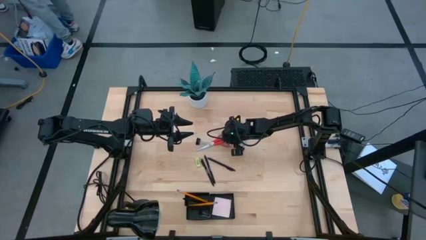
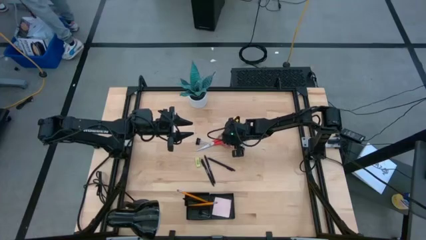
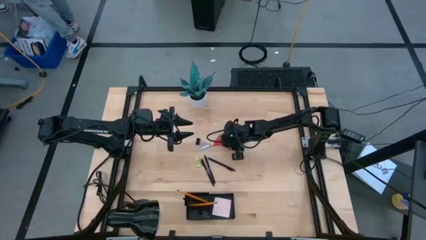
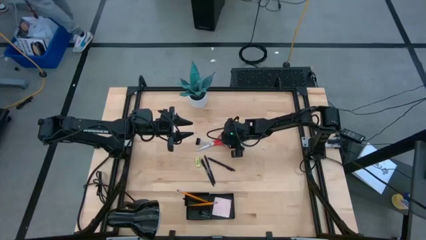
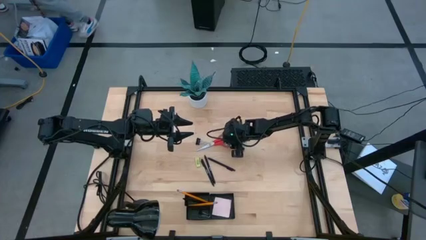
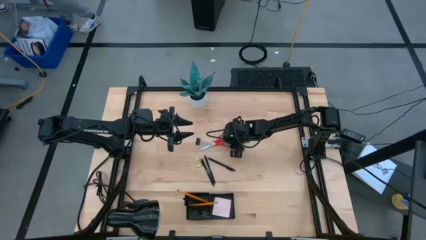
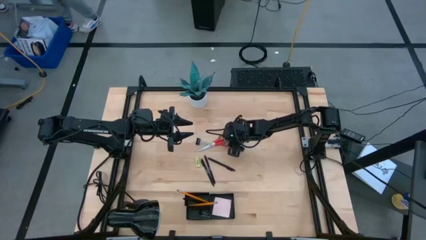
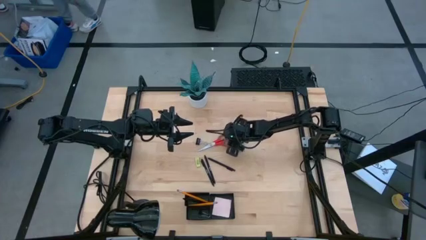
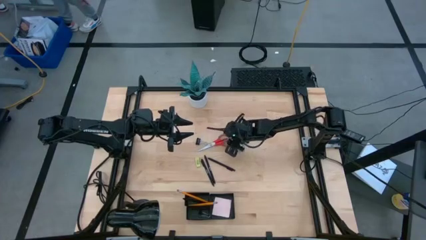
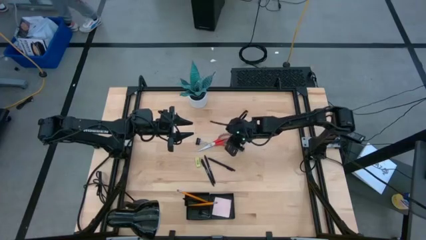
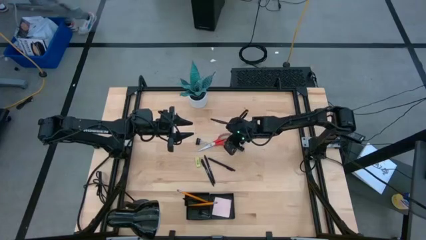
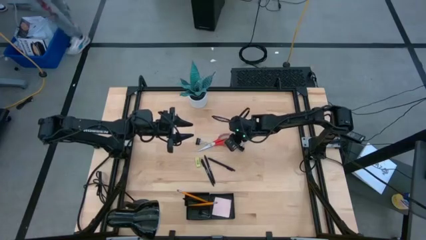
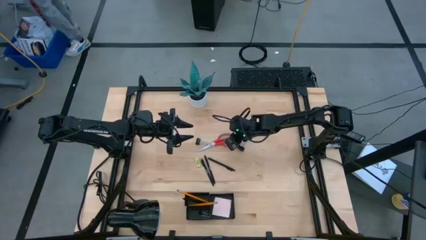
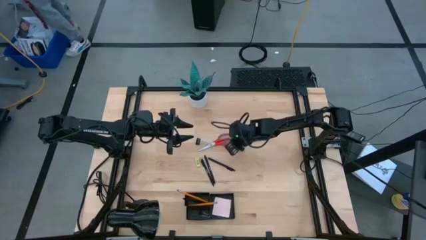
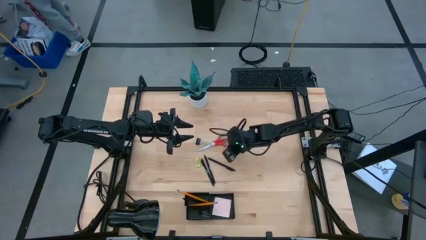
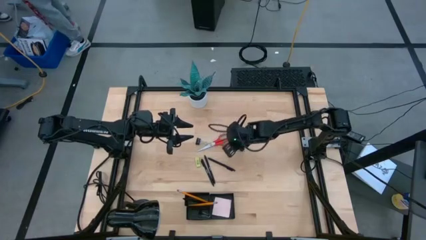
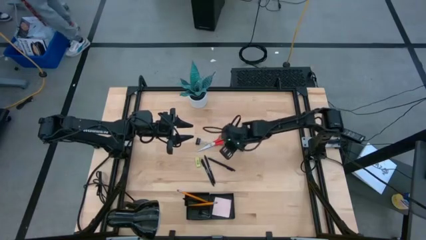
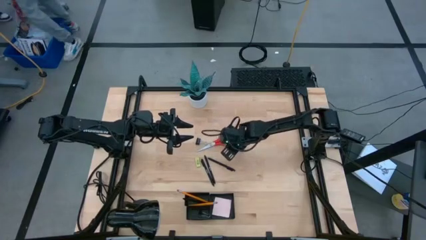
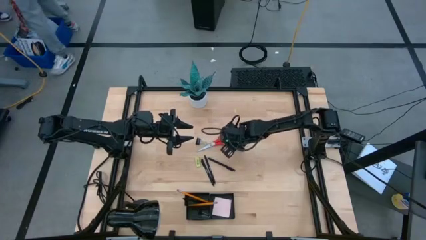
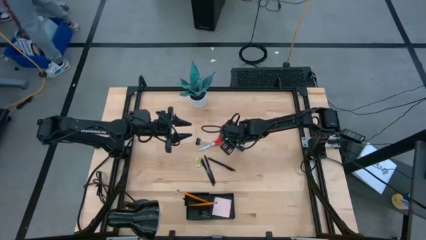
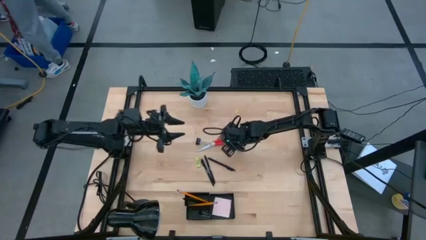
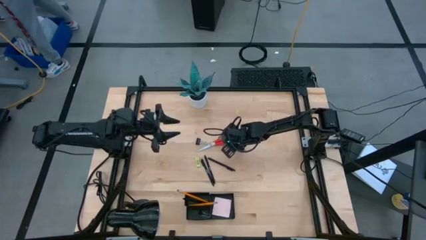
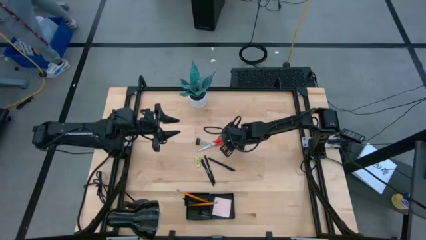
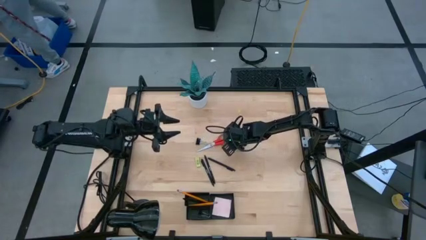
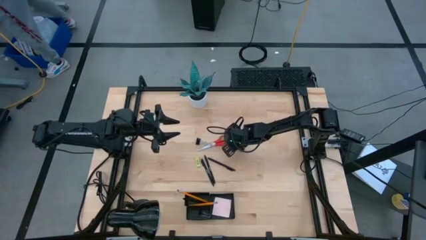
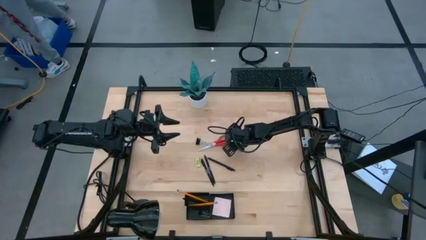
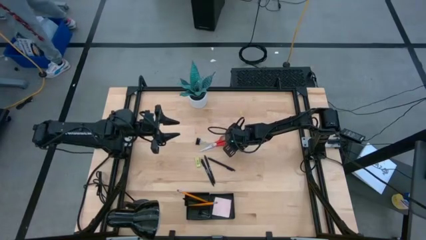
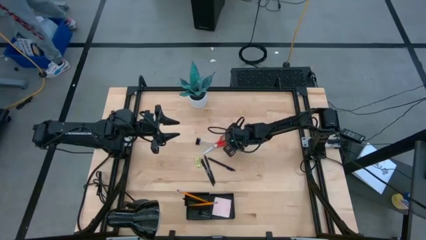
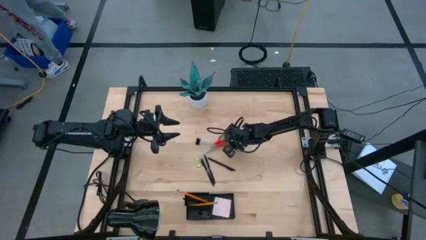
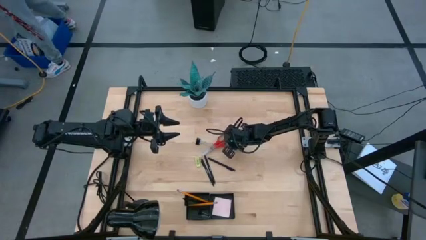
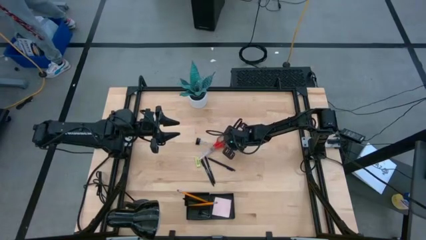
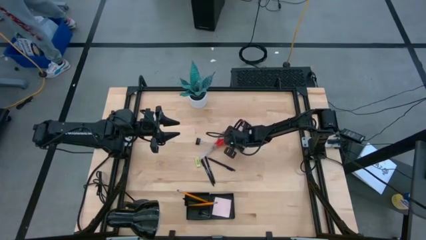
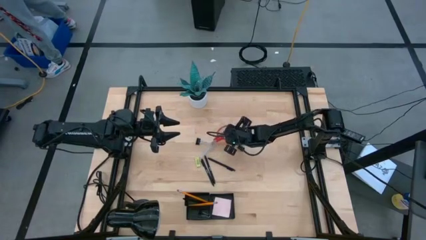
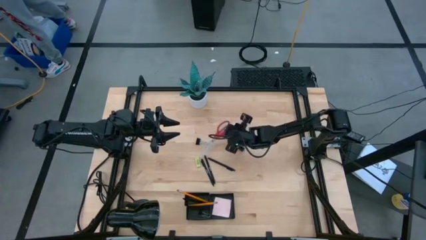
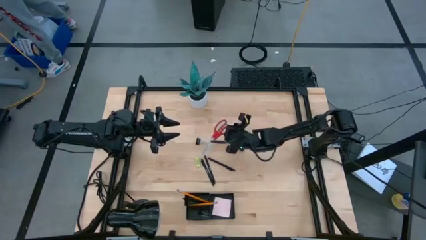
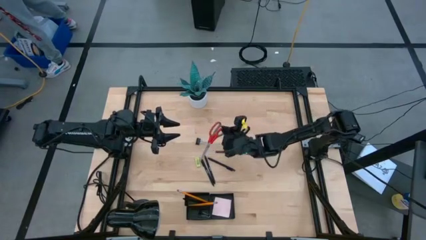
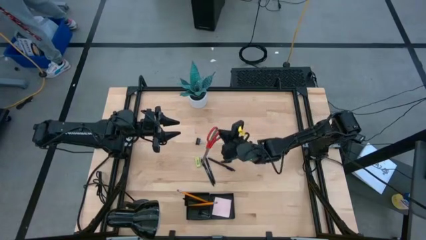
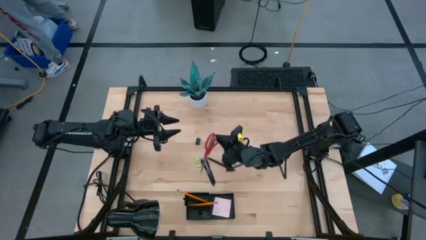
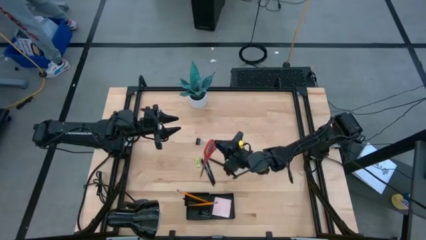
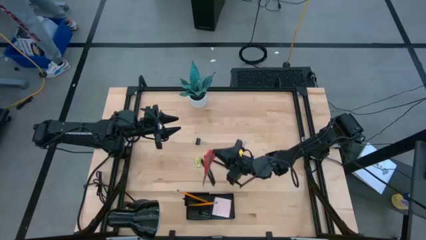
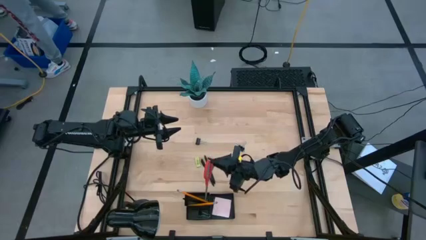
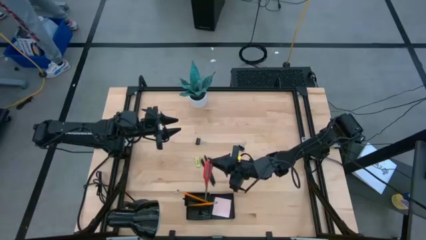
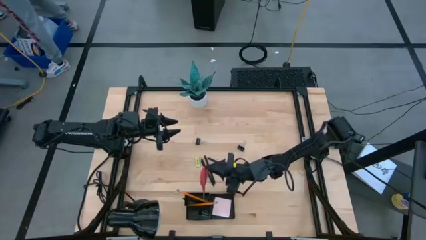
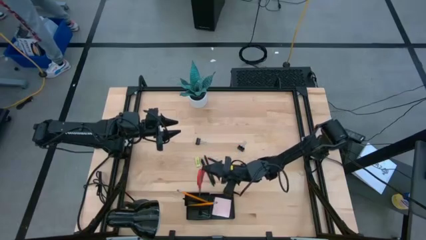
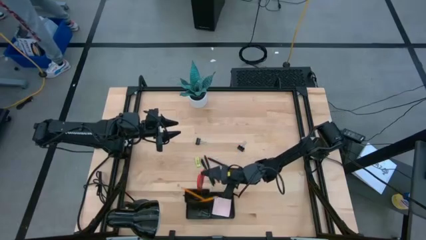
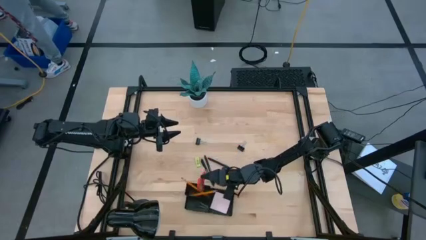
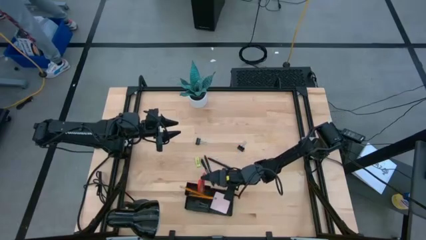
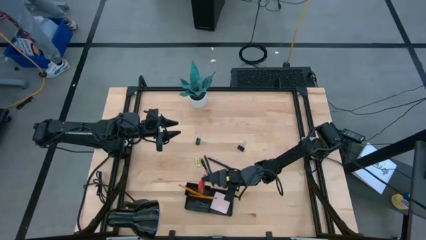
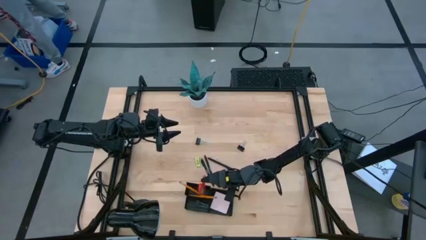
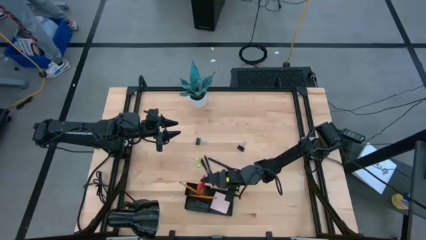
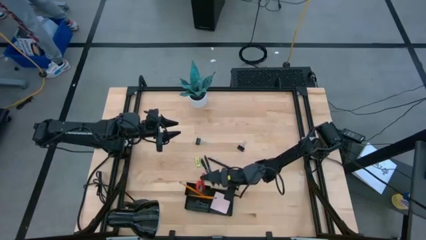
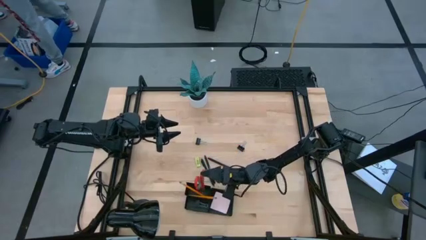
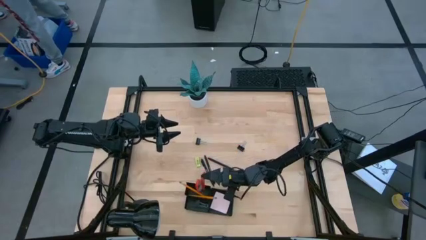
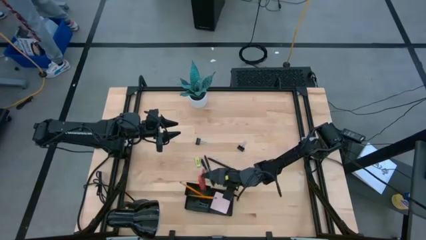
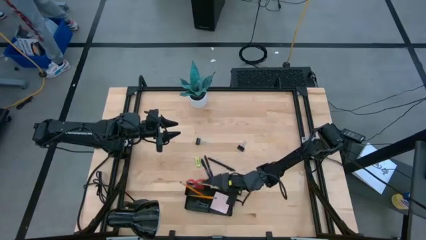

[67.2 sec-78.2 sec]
Task: Pick and place office supplies into organizer
Put the red scissors into the black desk organizer

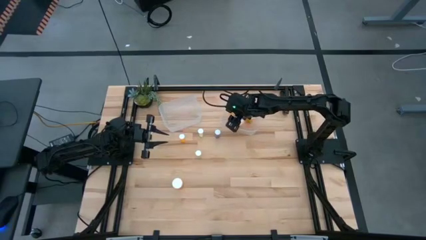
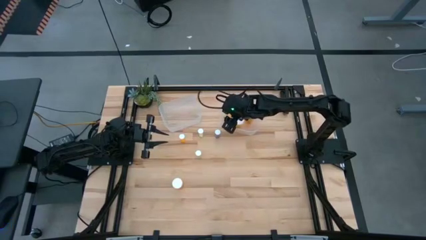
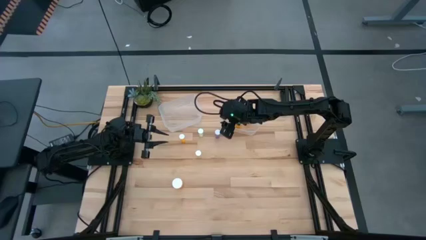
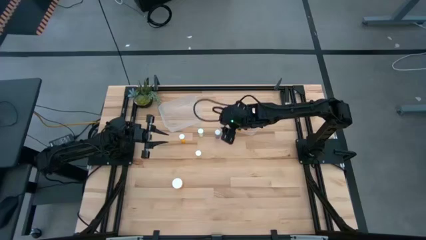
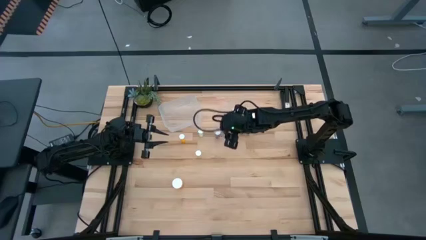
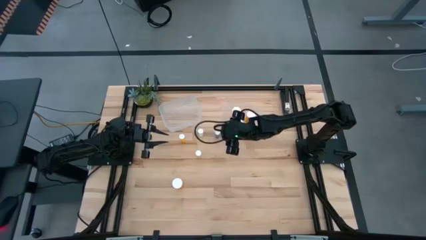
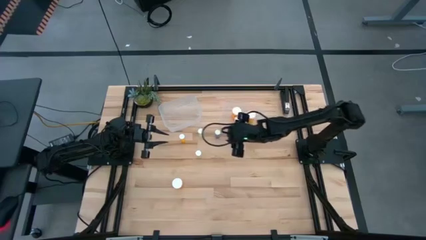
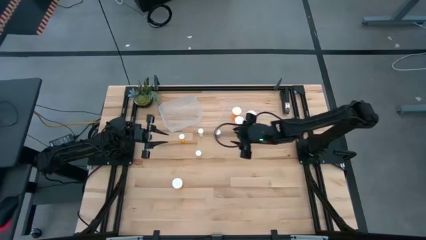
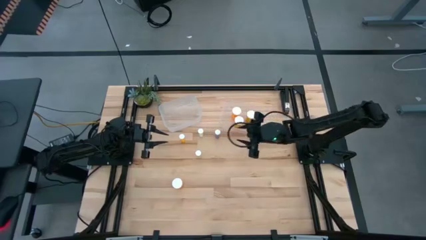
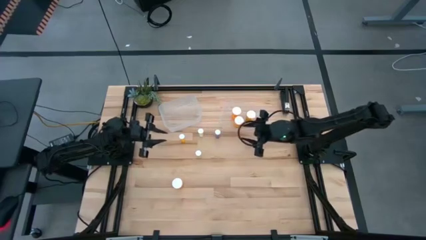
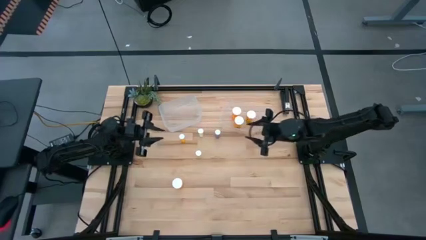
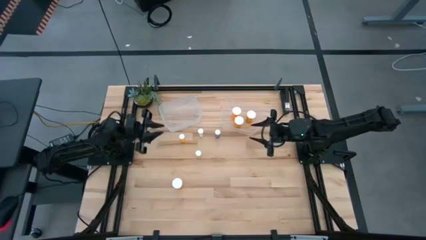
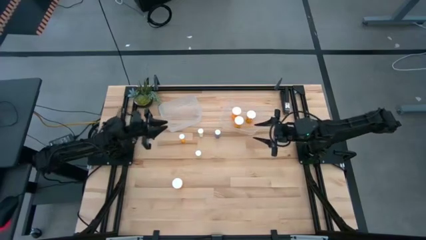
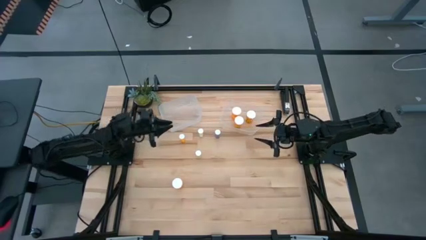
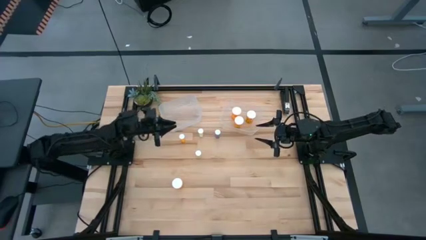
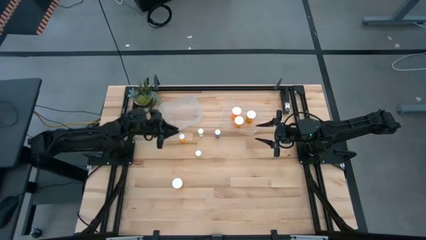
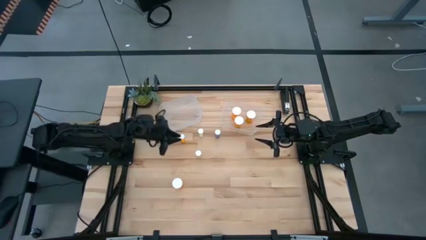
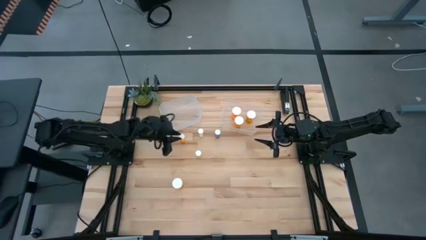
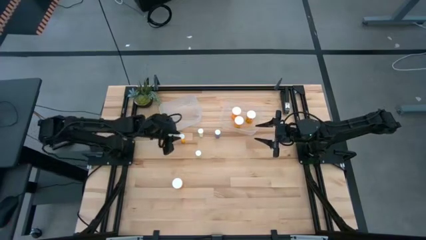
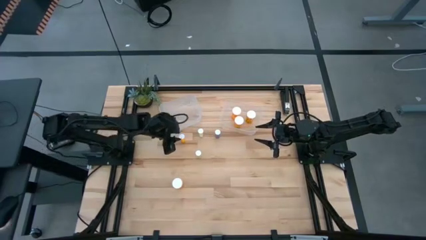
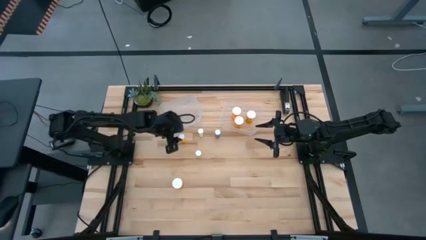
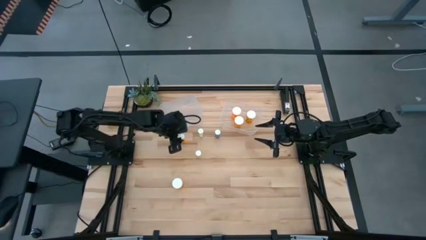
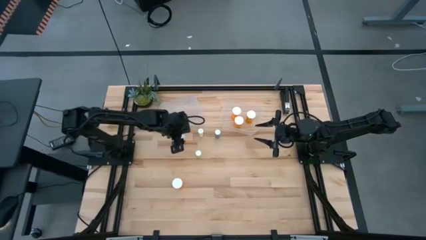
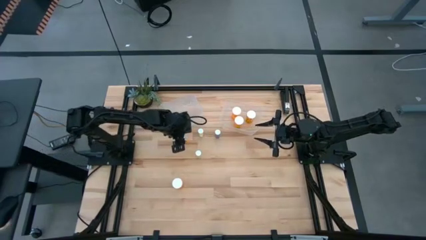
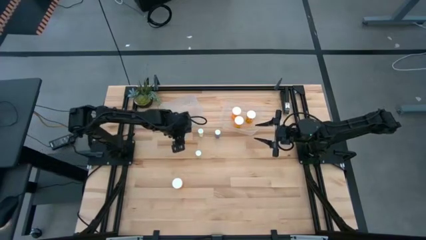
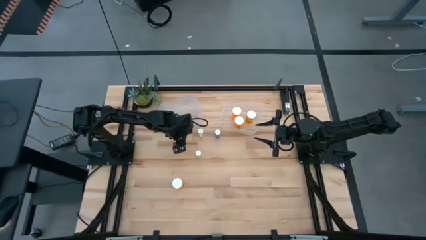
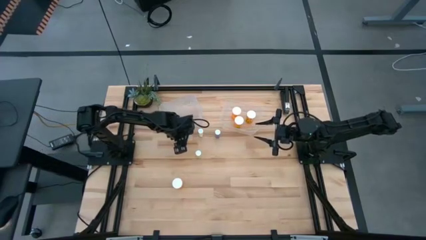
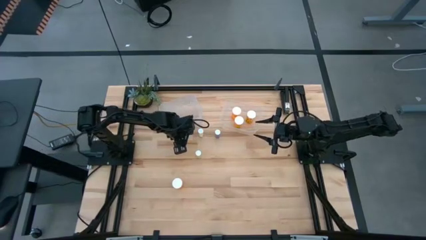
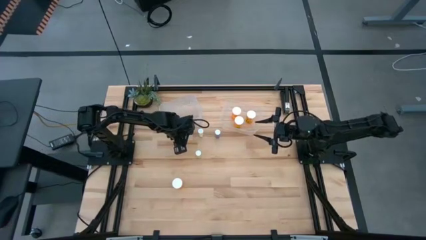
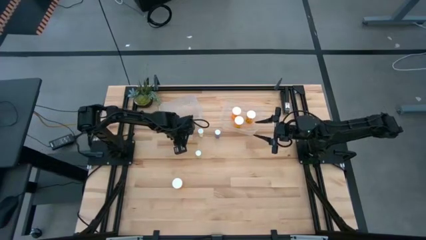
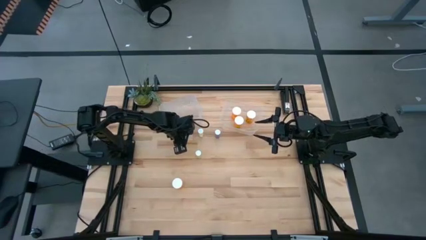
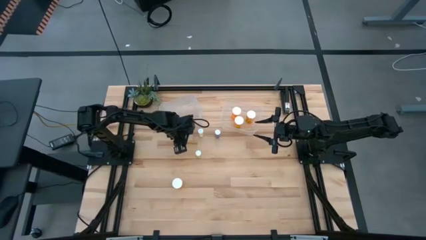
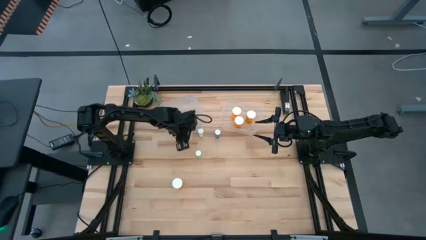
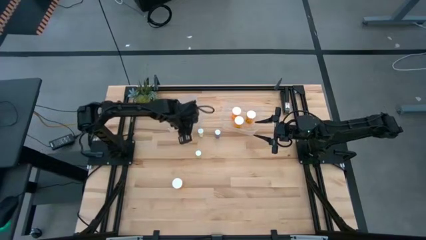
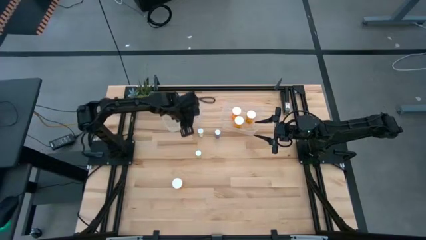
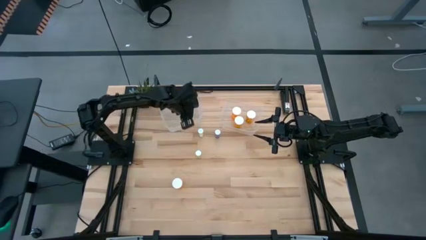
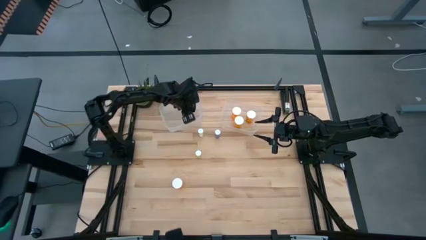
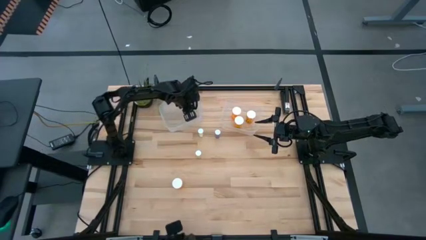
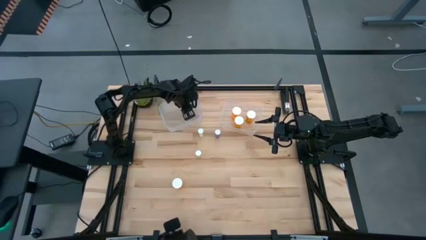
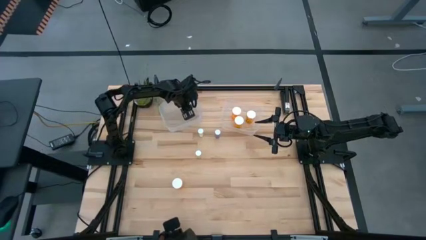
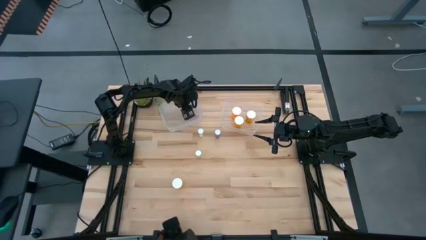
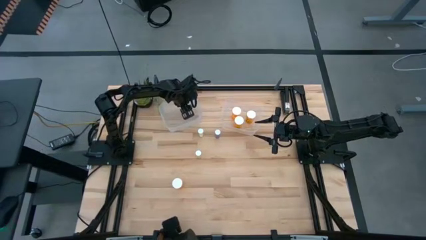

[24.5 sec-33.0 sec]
Task: Pick and place medicine bottles into bin by pill shape (circle, oval)
Put the orange pill bottle into the left bin
